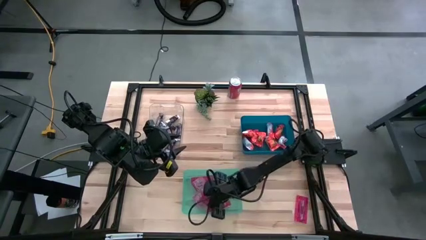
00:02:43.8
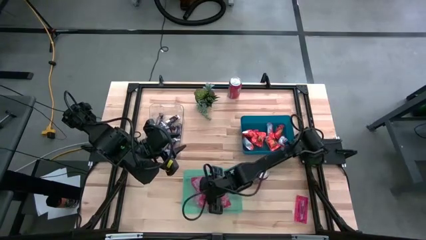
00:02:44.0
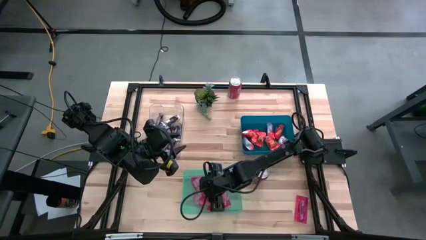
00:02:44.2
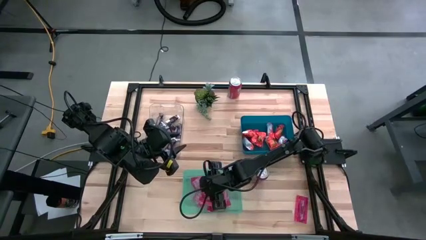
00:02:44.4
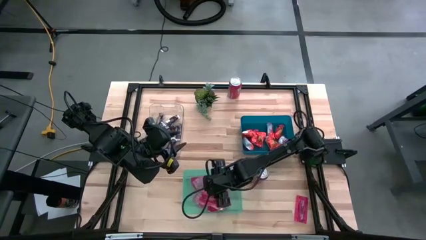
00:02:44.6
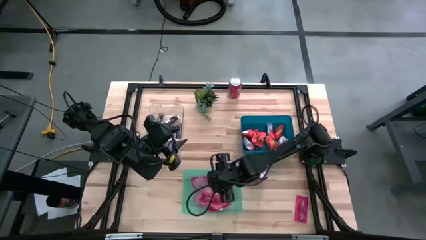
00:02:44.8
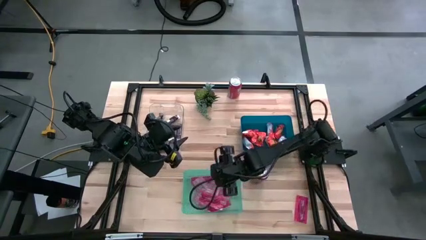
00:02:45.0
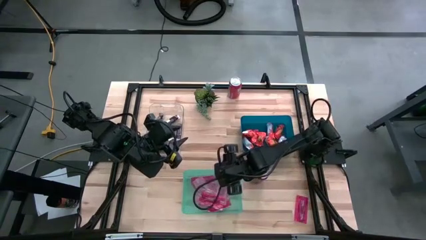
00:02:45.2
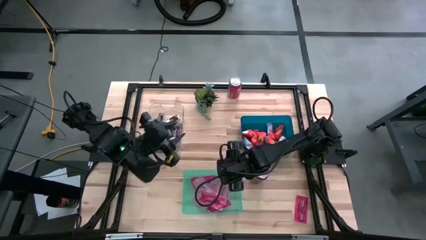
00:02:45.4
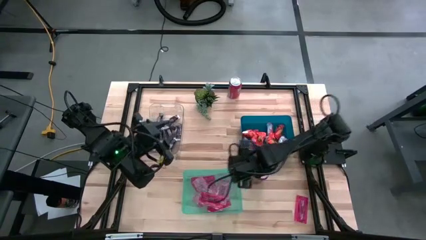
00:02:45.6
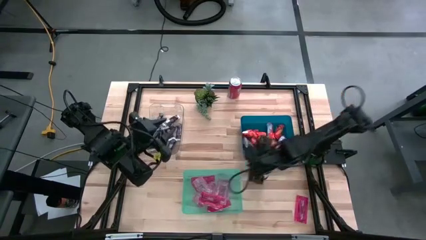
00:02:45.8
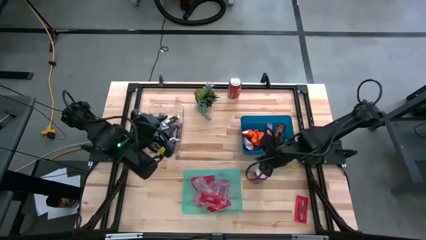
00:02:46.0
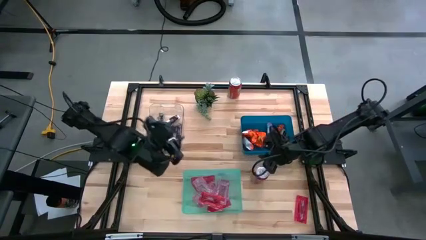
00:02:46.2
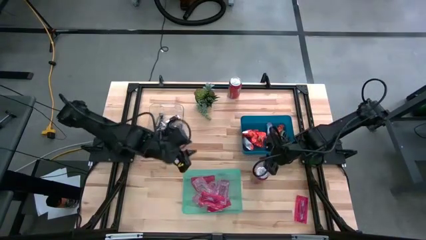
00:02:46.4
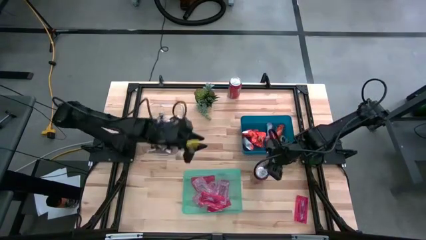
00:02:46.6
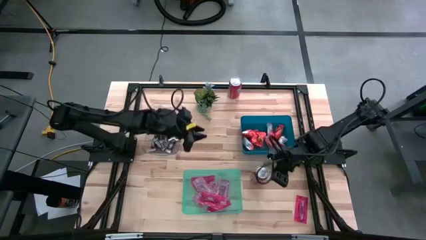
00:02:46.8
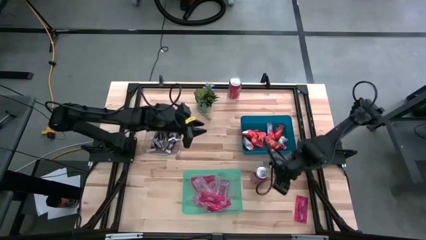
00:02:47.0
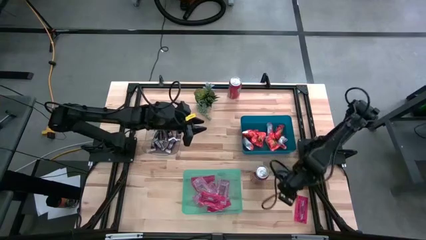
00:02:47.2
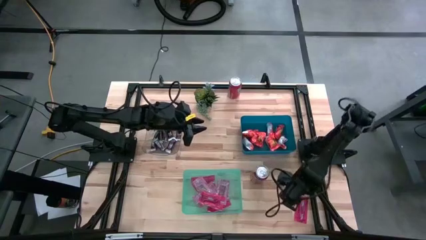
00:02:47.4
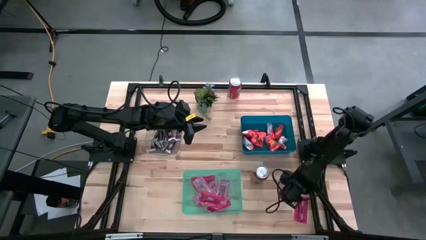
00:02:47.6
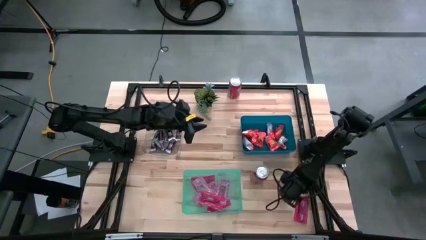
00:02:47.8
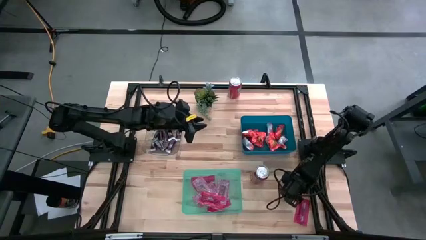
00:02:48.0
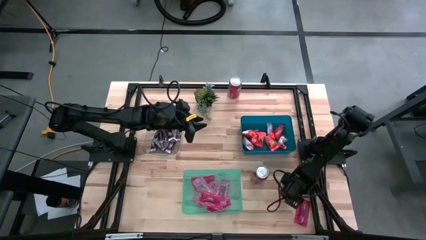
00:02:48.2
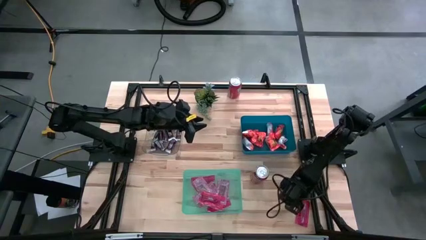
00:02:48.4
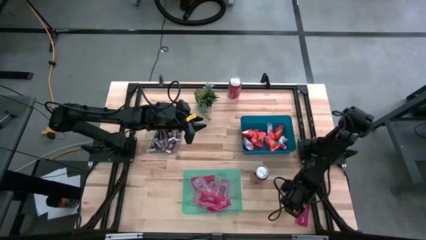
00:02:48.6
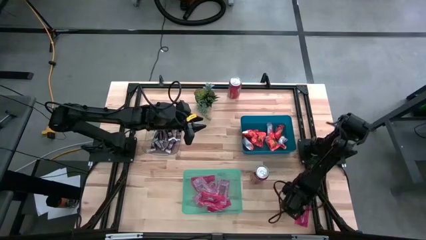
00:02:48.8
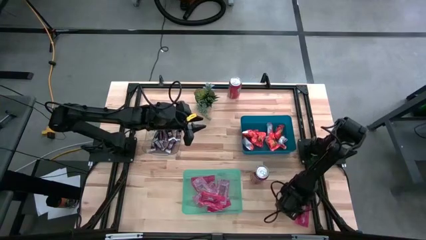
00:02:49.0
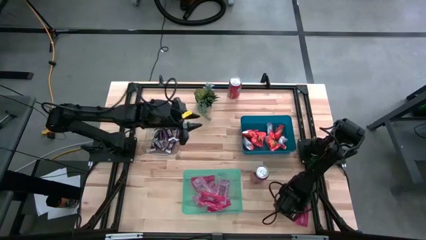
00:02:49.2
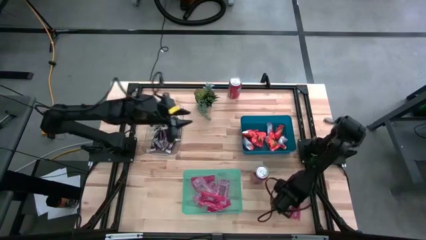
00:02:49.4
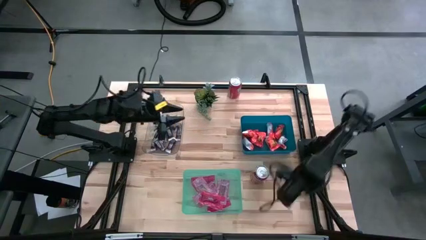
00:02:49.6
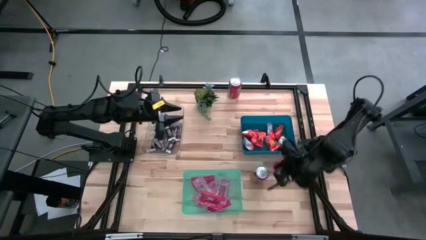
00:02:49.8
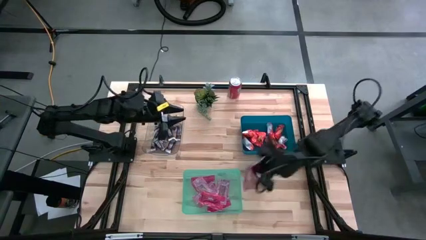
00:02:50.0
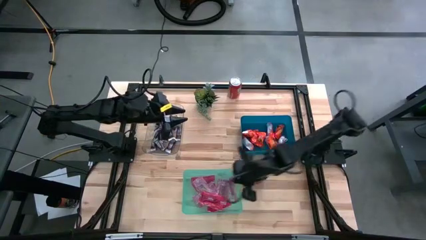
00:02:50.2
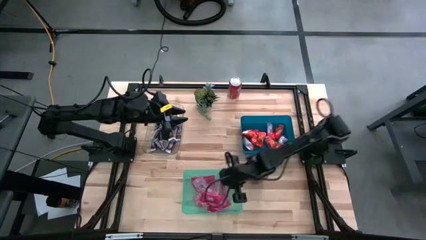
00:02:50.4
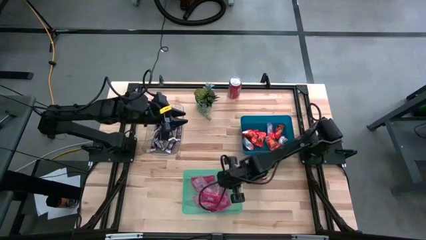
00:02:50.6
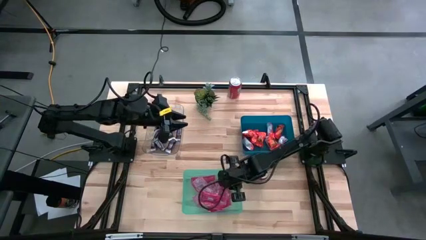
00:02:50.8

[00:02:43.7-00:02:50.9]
Task: Sort candy
Put the red candy into the green bin

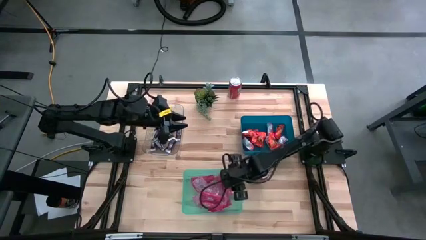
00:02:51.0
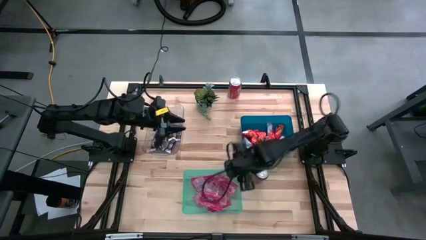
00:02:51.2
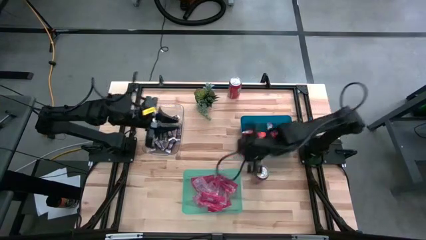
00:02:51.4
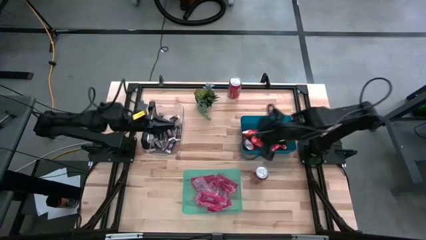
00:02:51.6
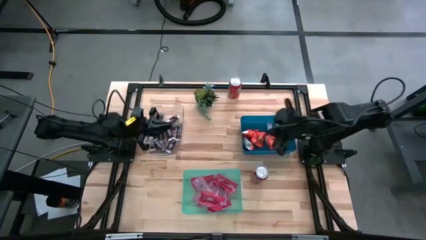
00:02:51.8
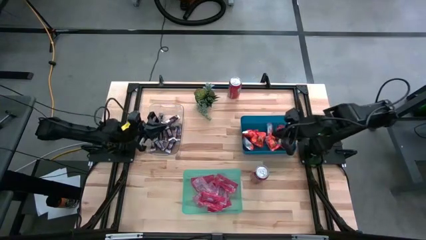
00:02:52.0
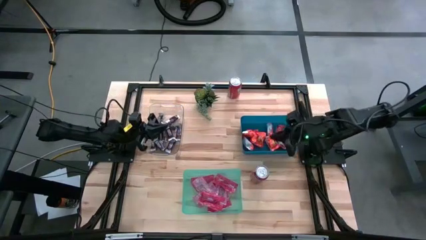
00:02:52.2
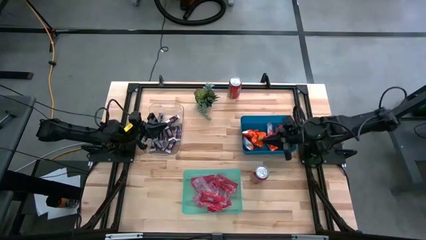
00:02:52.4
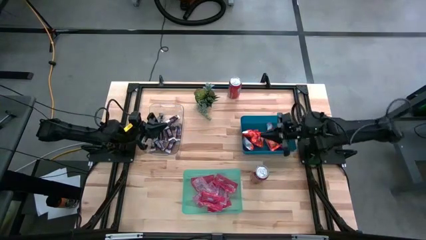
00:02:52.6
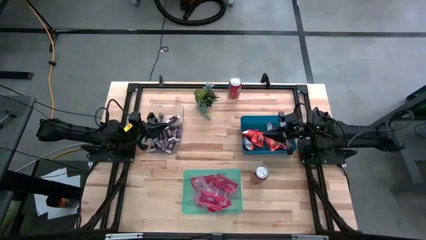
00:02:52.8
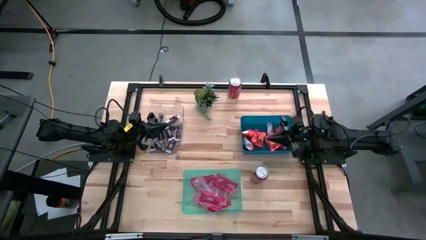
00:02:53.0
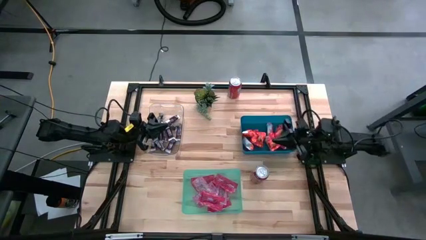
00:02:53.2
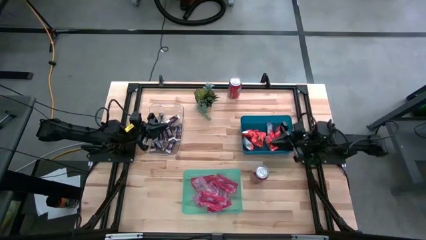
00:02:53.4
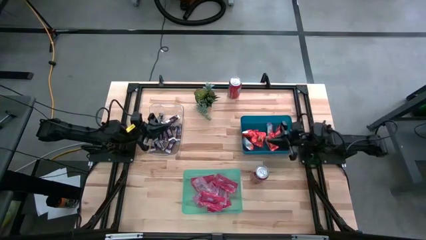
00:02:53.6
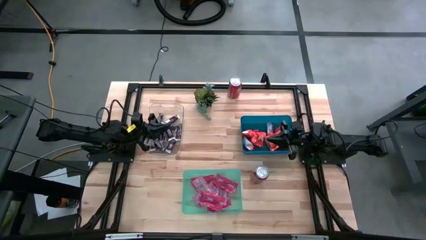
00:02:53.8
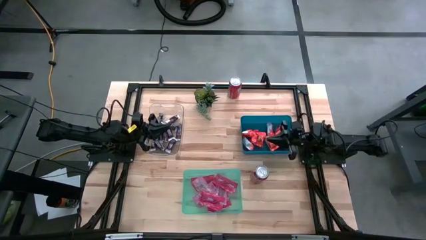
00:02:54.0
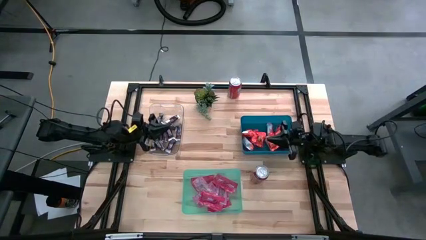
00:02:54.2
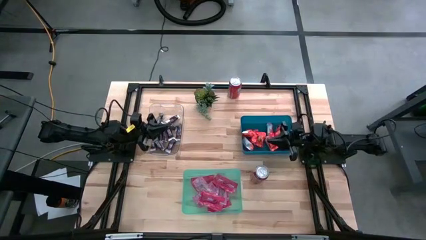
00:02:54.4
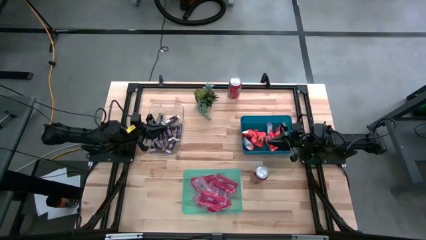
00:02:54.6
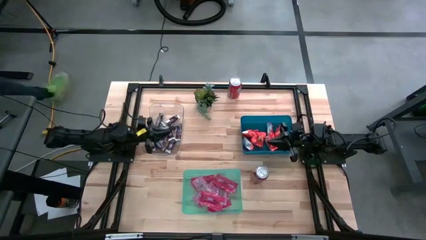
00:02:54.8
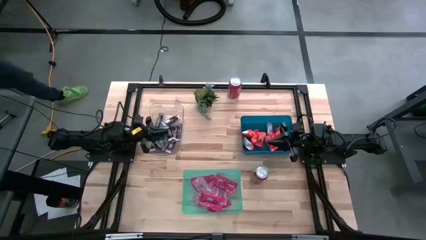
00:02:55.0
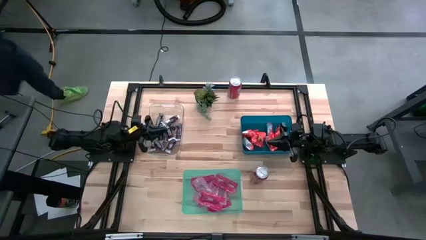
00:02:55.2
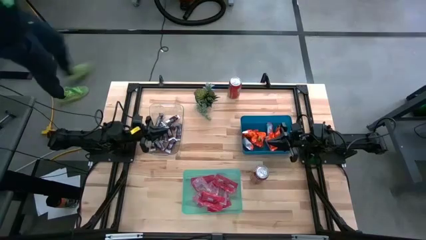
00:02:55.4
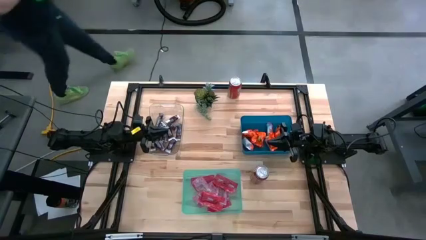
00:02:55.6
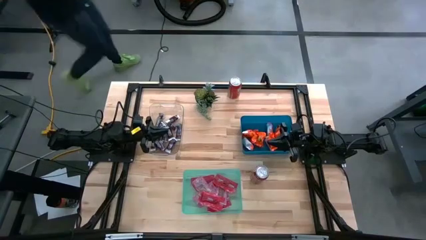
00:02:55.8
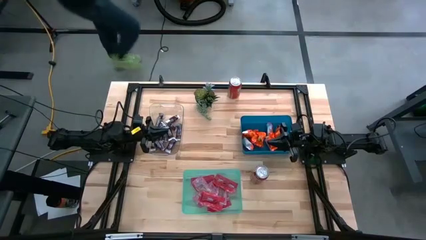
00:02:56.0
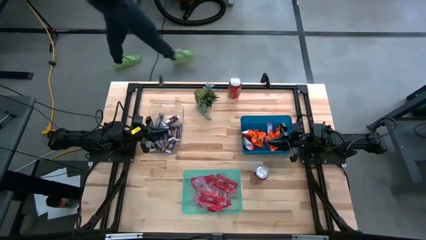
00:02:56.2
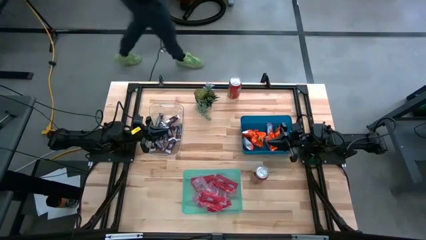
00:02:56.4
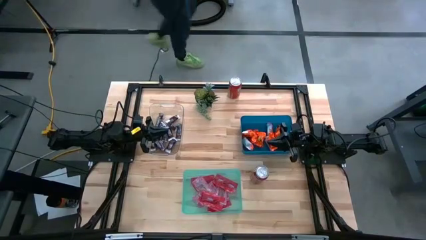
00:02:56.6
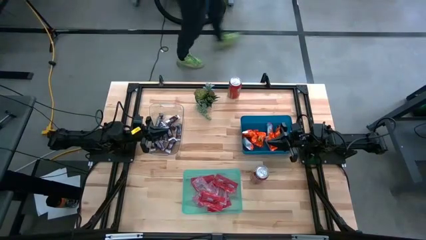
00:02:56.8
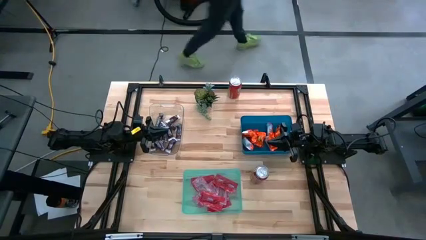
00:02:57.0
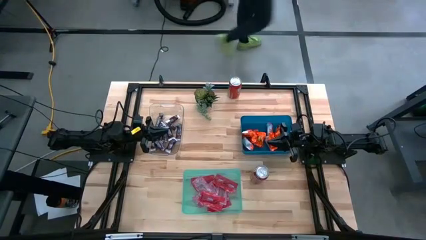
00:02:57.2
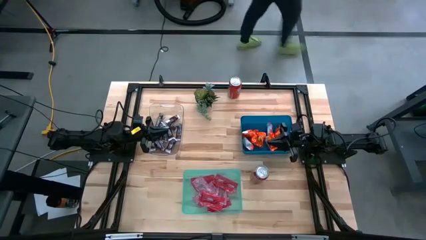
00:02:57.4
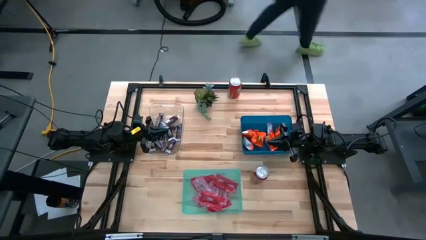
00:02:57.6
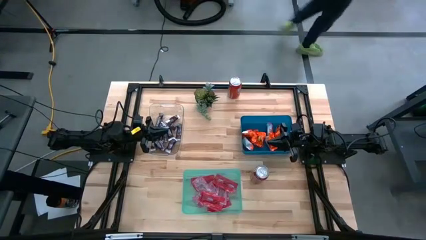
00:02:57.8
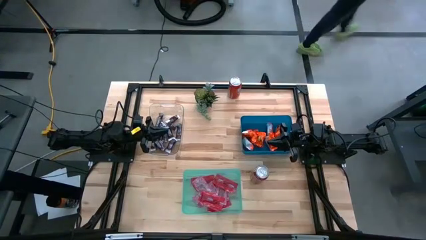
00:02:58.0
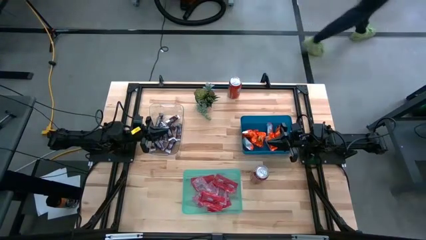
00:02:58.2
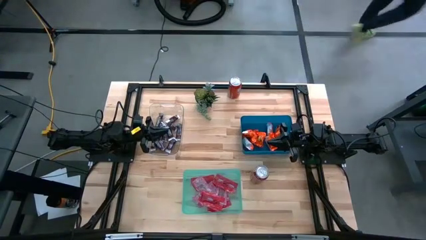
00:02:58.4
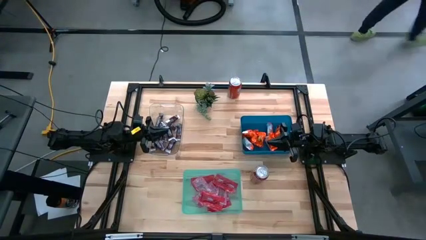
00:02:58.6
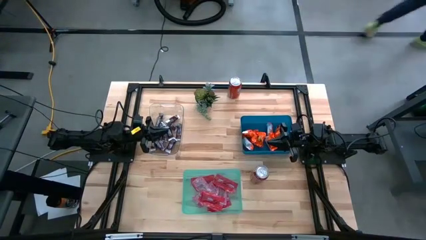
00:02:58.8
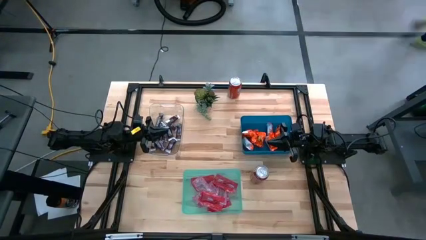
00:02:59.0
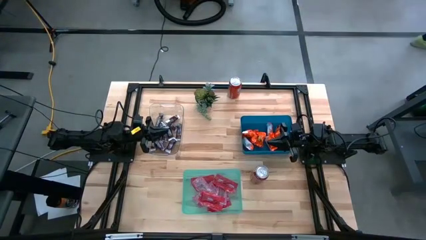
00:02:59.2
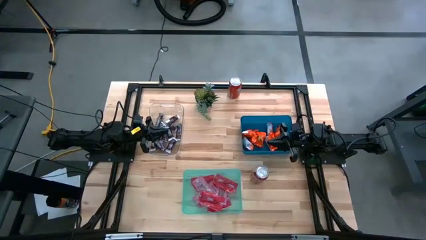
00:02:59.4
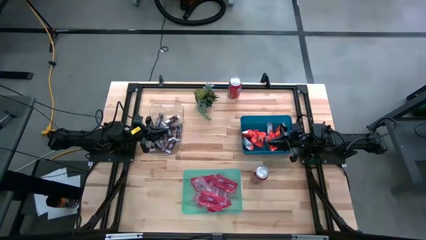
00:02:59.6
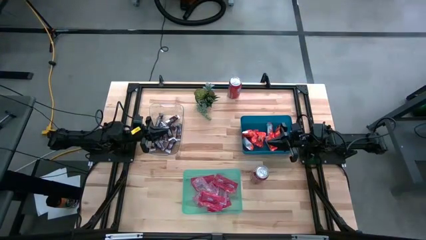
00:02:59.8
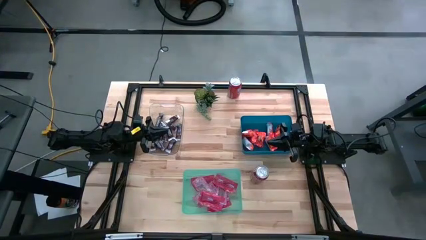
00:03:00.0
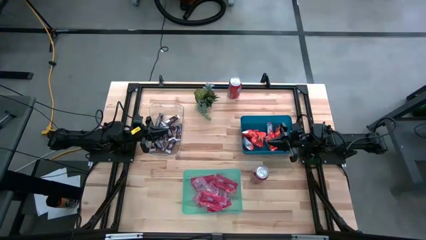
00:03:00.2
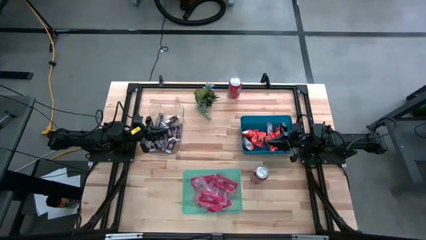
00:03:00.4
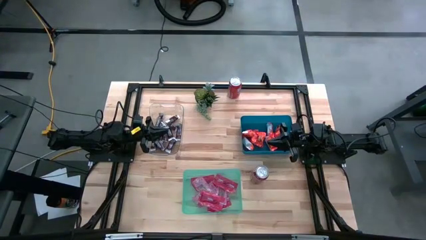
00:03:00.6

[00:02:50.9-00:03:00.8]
Return to Home Position
